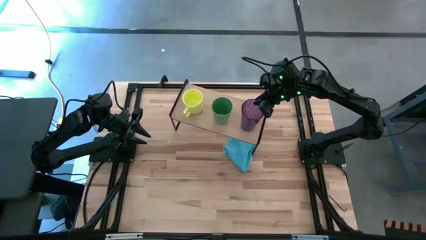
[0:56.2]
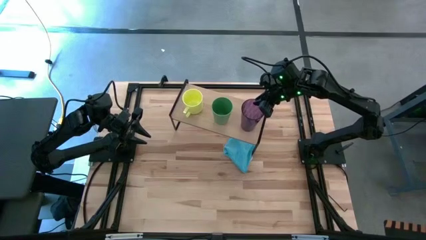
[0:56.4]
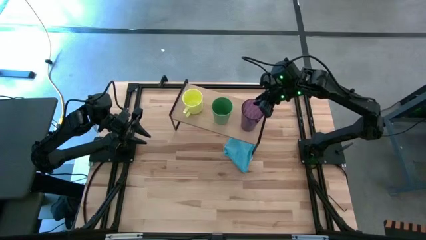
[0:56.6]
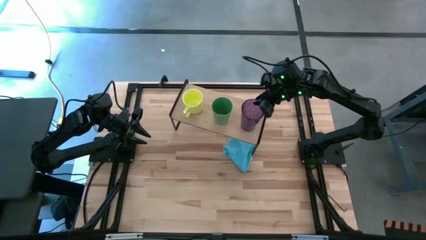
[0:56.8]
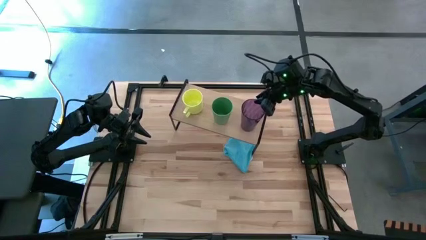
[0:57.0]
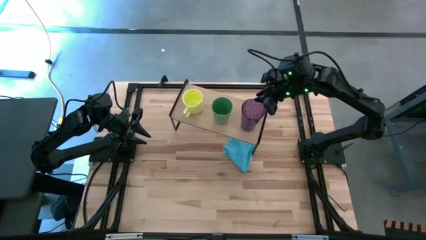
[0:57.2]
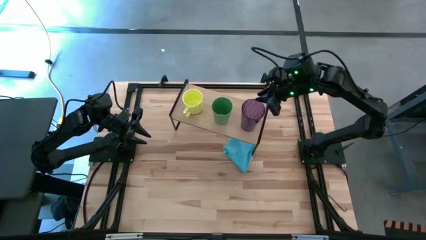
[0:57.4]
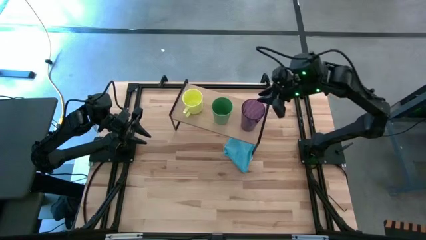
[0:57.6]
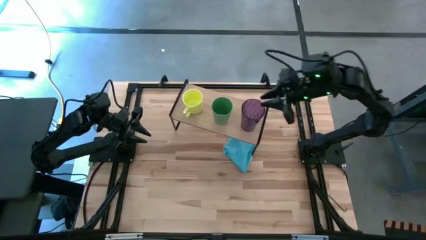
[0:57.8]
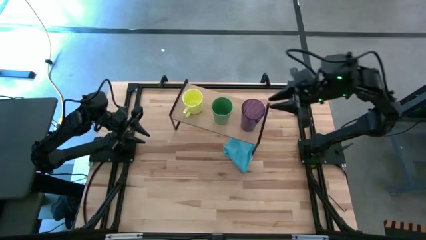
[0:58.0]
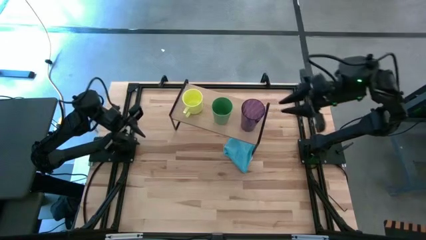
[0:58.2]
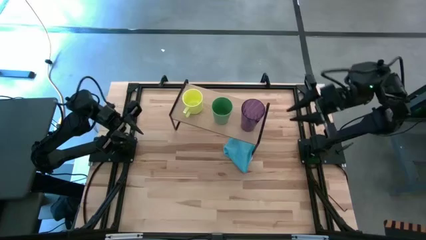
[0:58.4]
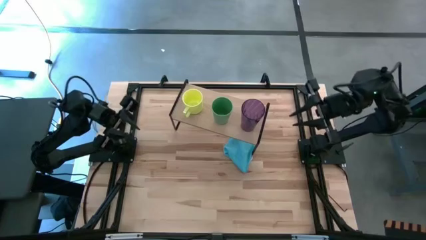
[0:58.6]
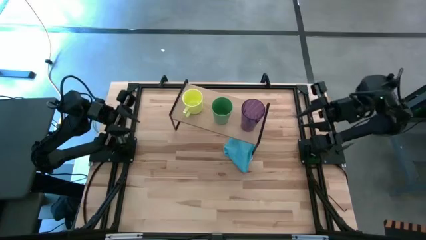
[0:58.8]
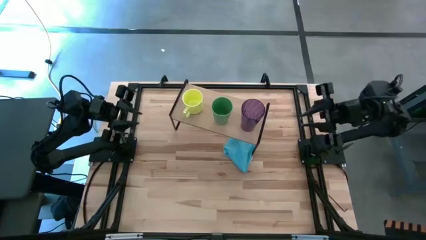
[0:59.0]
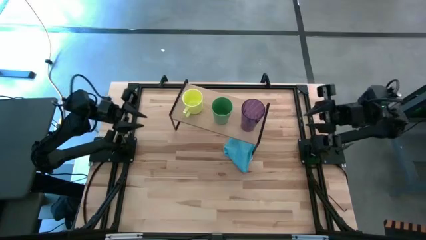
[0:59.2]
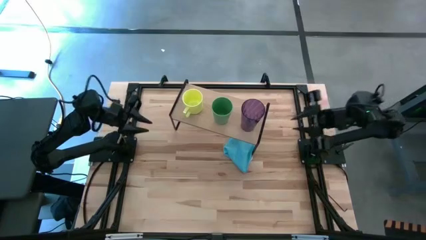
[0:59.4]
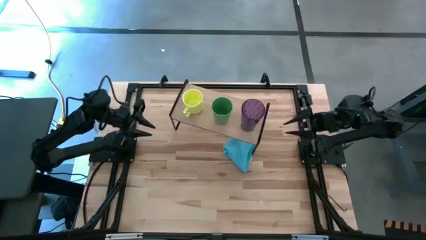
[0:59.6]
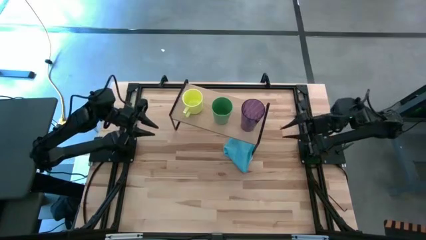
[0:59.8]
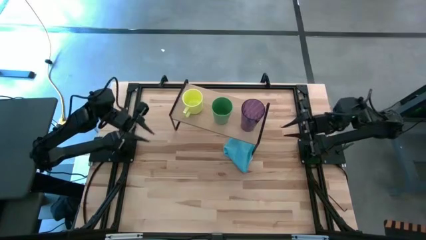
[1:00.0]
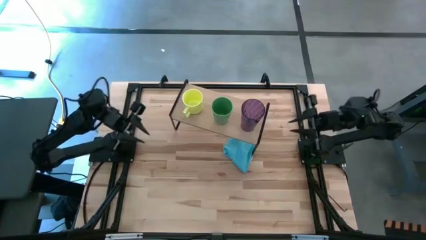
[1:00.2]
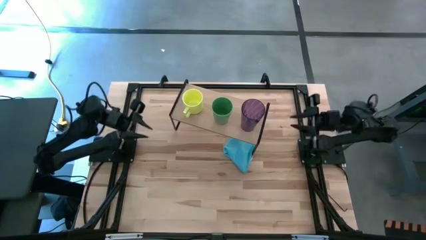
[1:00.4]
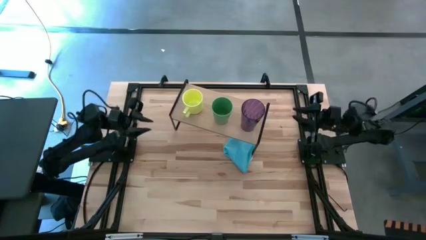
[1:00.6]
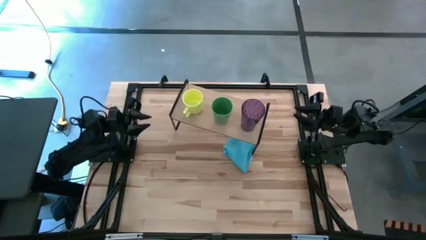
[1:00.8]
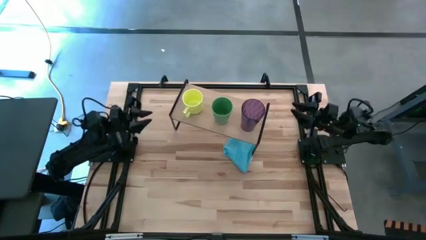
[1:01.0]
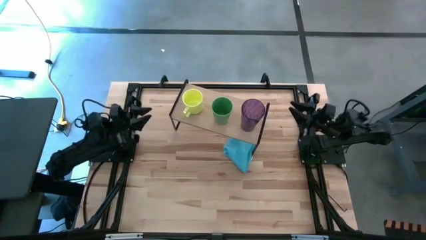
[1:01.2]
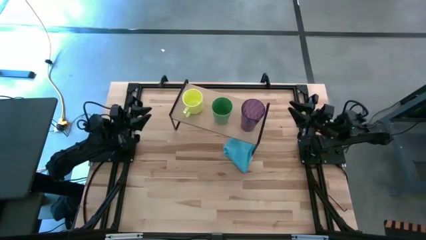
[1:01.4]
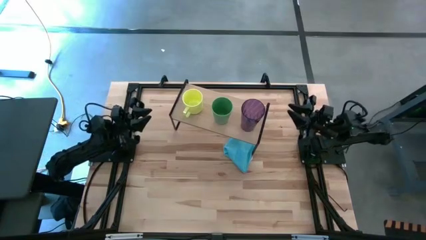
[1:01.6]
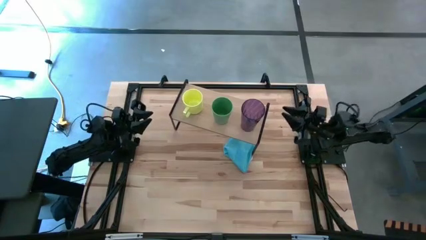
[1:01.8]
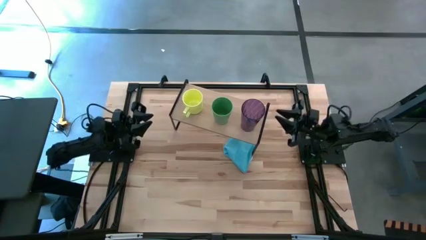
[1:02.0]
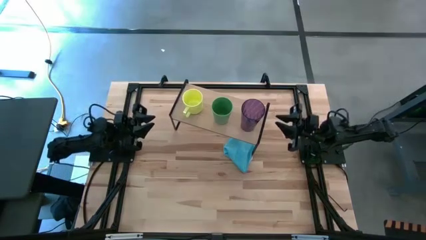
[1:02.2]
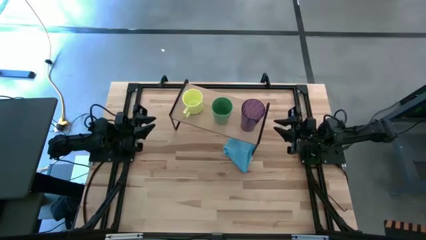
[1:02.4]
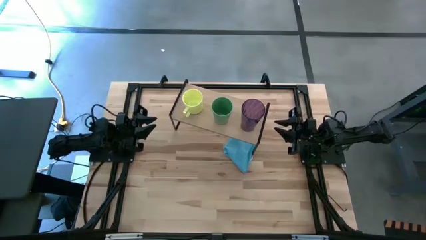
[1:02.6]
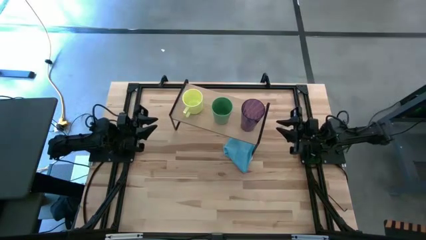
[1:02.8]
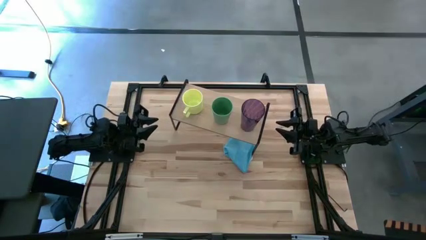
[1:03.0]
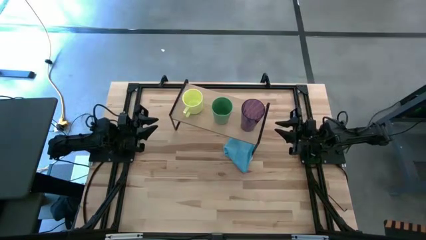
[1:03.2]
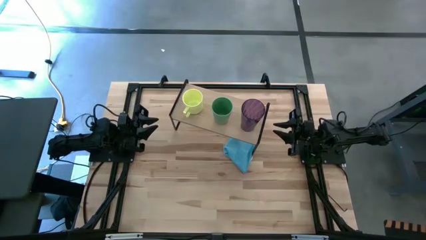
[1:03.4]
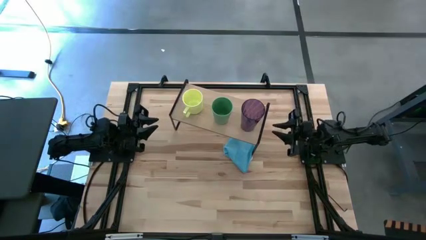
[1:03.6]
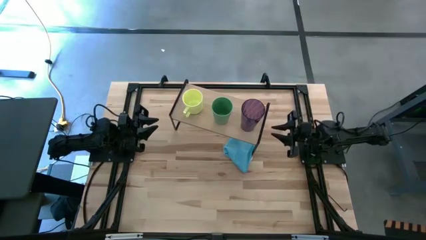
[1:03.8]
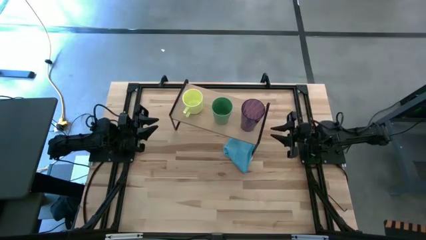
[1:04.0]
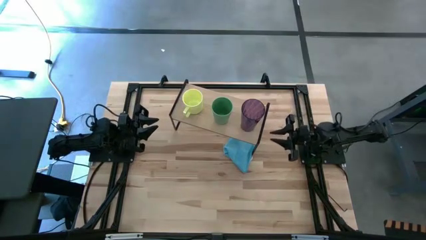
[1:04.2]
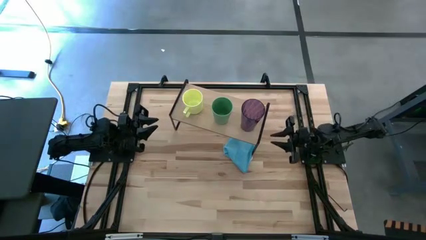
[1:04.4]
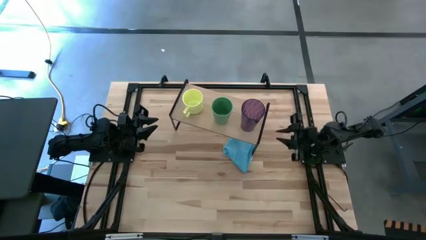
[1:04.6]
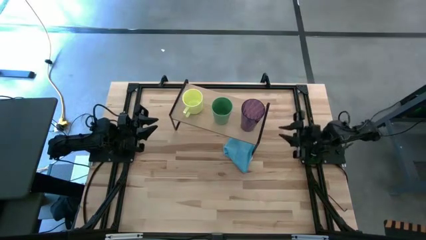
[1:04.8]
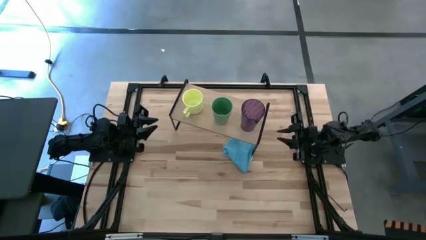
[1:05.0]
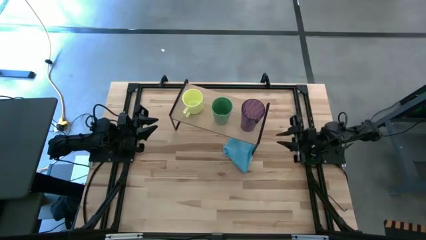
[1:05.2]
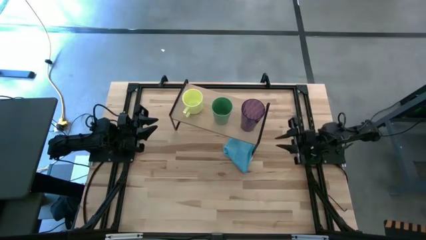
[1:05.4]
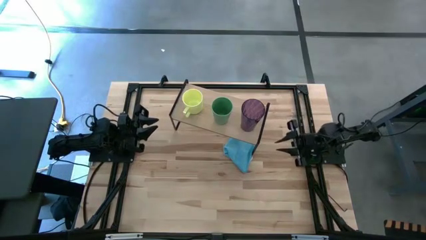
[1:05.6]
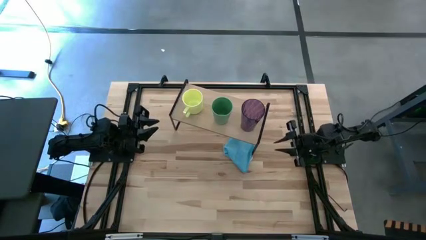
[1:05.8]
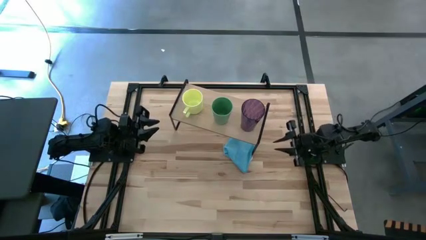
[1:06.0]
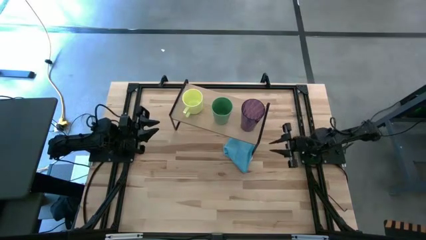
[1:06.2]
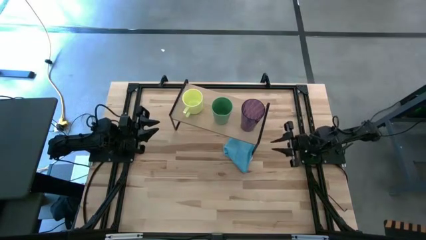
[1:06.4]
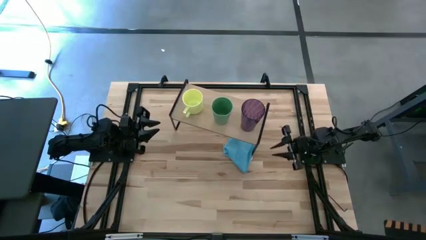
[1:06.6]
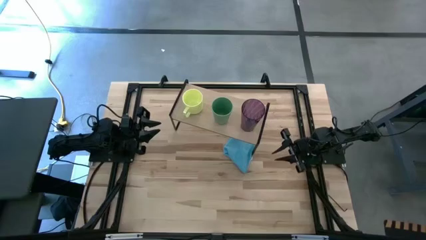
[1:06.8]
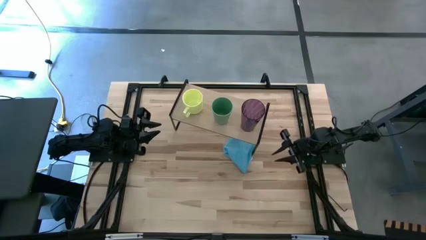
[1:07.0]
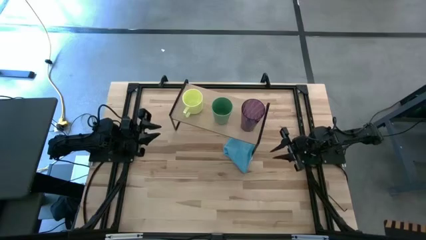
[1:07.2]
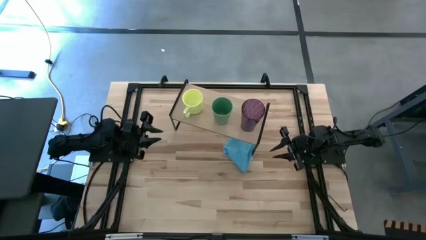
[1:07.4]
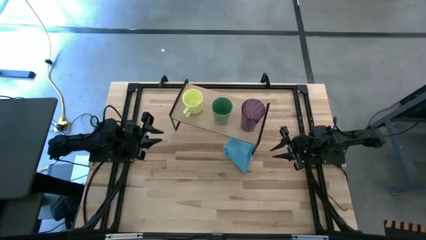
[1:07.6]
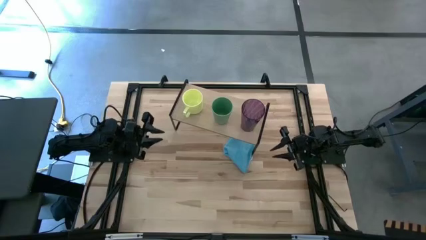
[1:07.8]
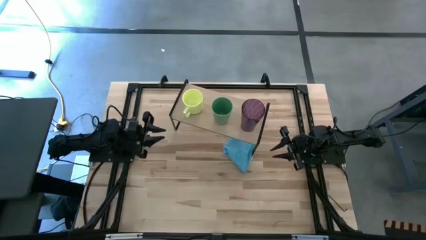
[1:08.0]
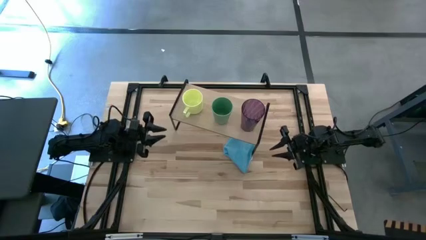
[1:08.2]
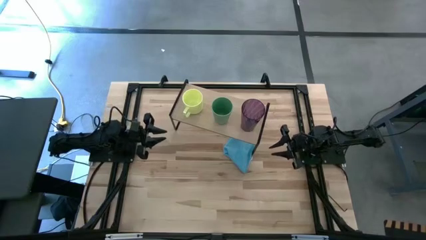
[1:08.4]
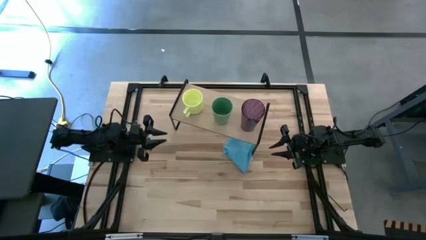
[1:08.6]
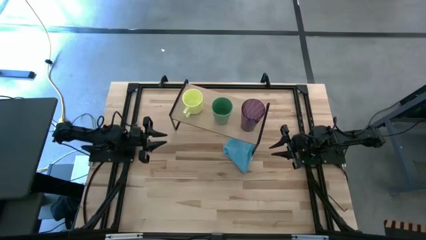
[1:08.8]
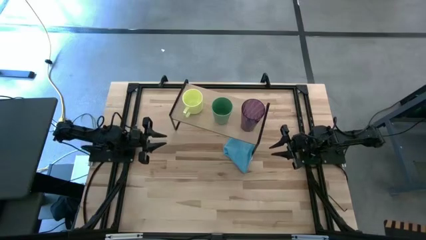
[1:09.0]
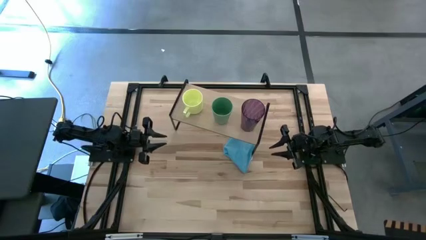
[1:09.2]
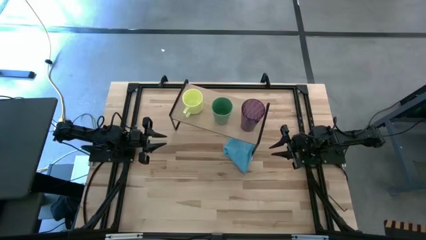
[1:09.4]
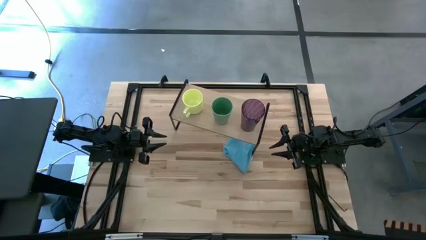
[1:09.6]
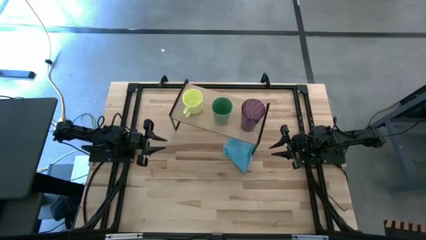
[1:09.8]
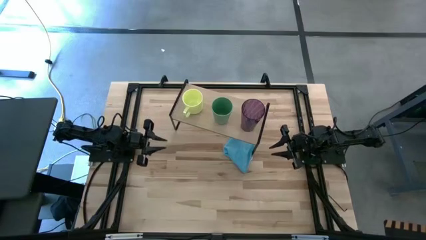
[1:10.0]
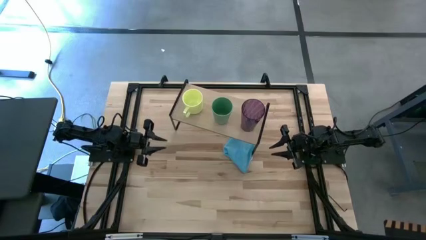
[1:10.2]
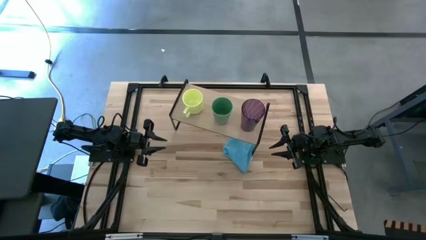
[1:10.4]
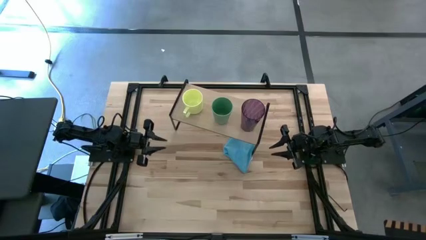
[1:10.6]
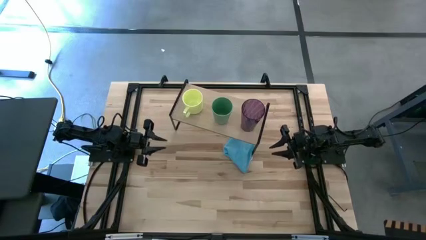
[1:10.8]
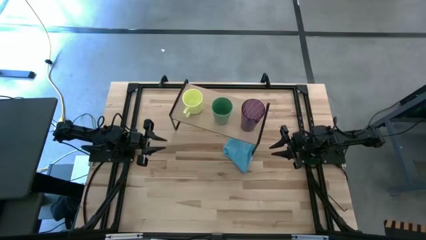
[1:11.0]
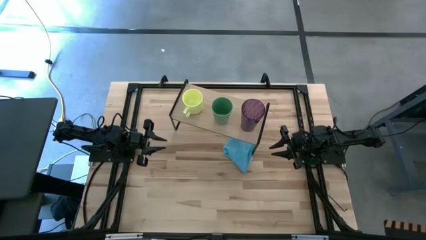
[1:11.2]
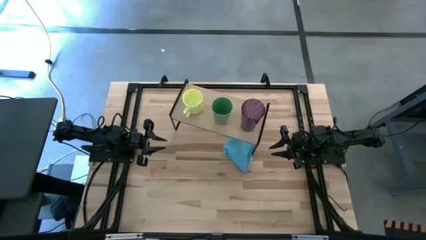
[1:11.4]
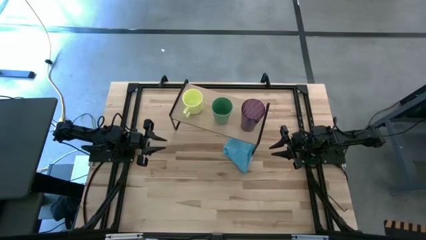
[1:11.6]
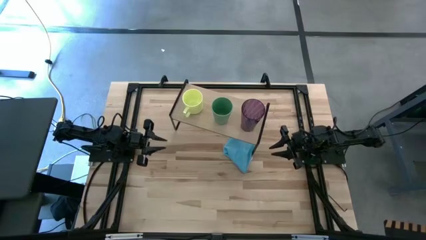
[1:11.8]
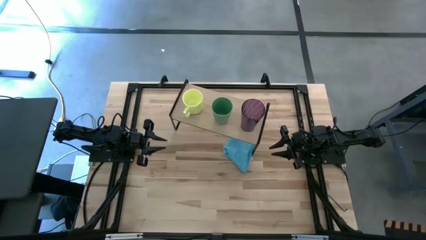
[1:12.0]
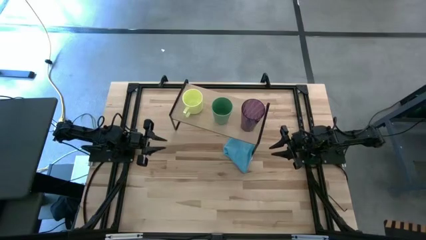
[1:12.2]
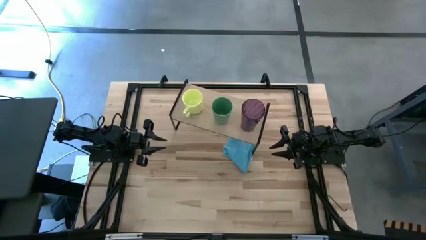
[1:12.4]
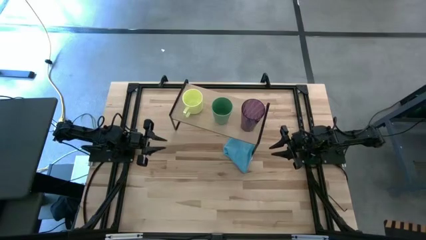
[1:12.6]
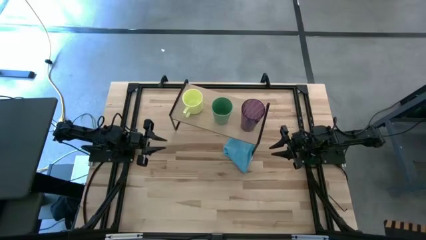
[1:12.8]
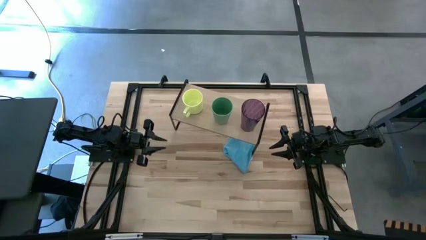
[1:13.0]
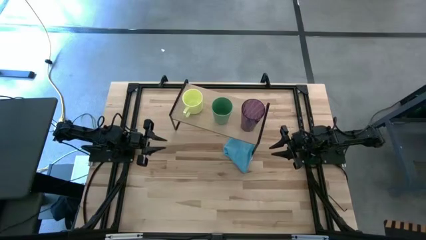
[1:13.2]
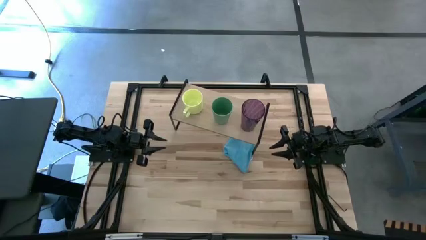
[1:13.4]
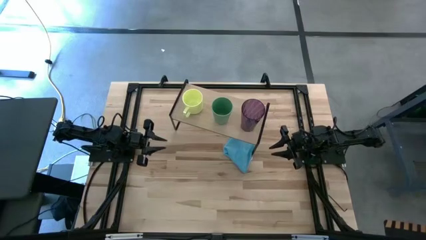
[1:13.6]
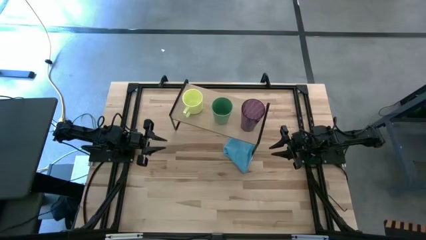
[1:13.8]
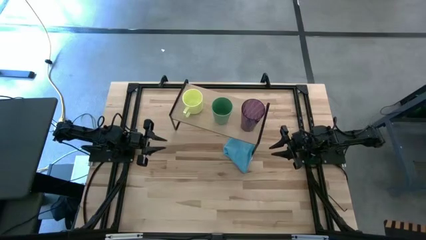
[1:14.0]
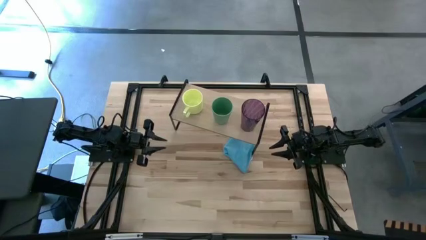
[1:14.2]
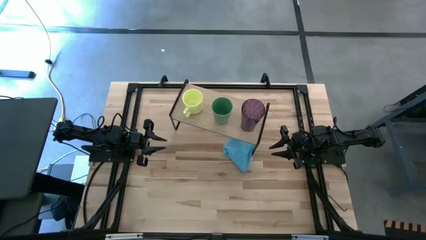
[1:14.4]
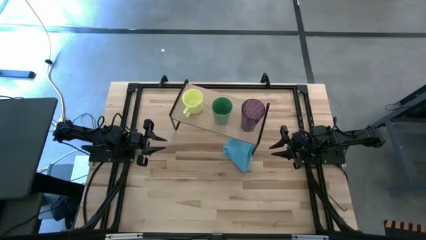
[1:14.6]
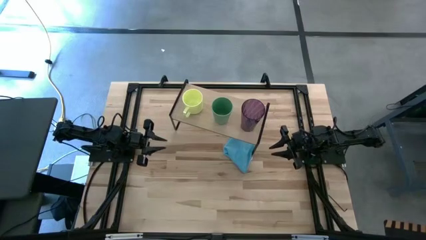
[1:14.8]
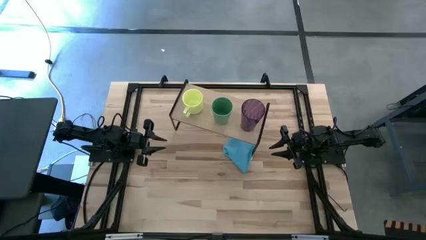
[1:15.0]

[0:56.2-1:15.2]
Task: Stack small to large cups/mugs on shelf
Return to Home Position
